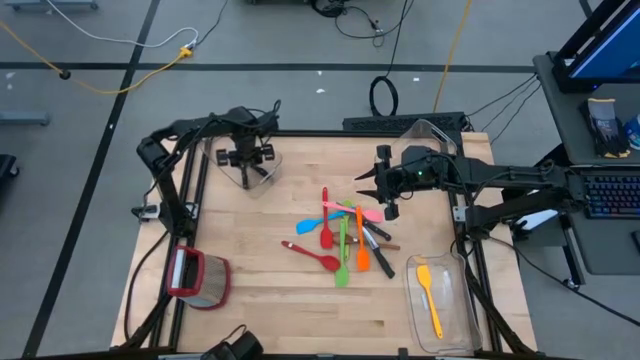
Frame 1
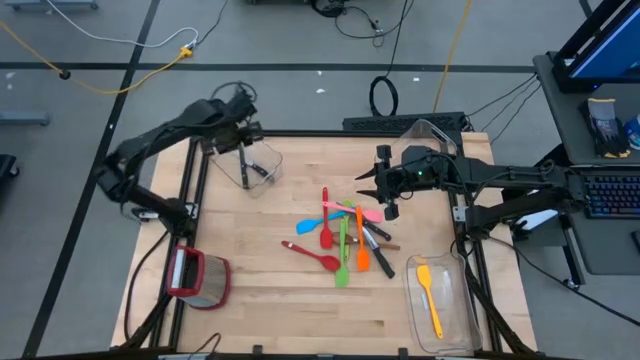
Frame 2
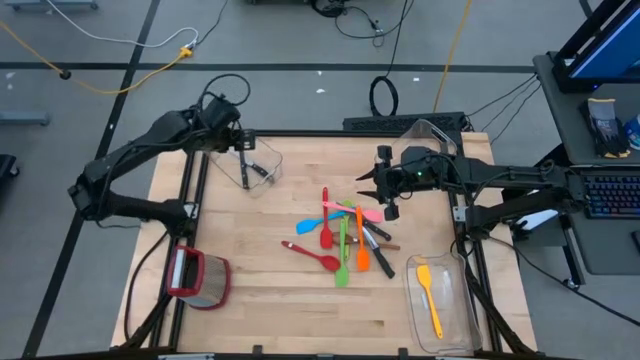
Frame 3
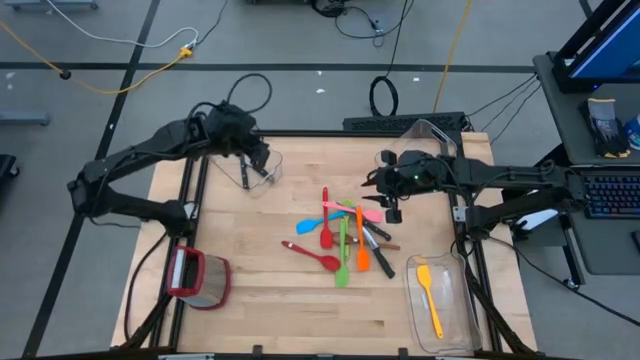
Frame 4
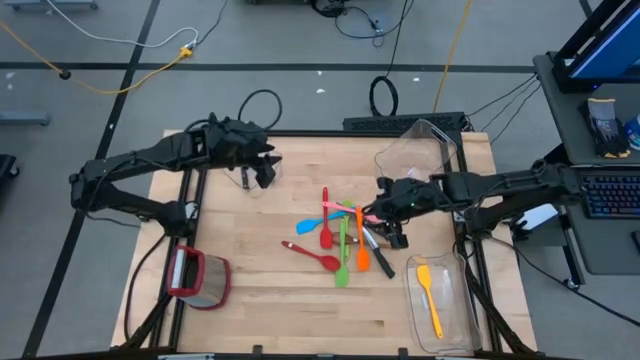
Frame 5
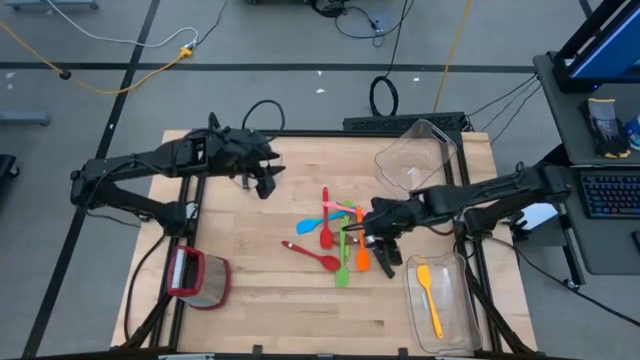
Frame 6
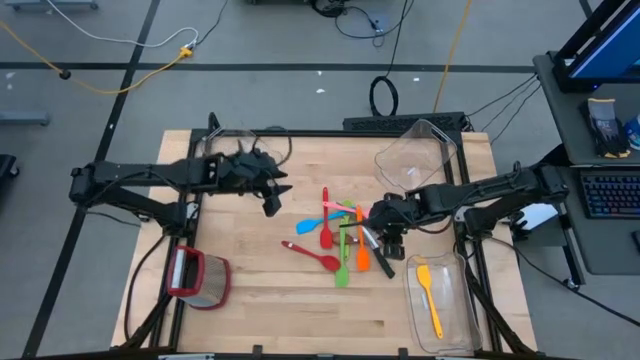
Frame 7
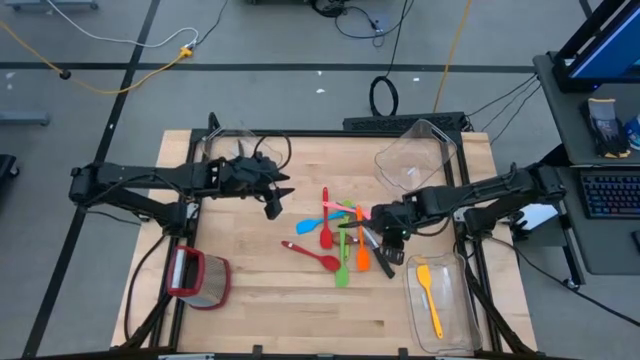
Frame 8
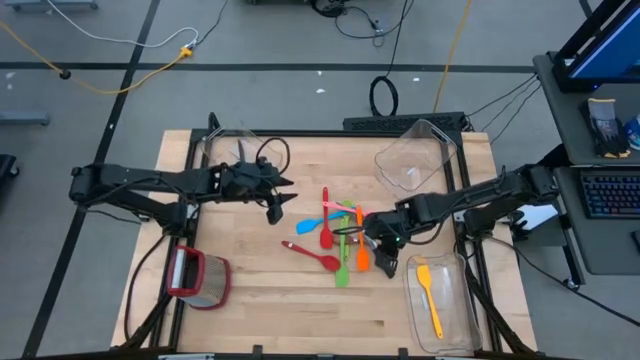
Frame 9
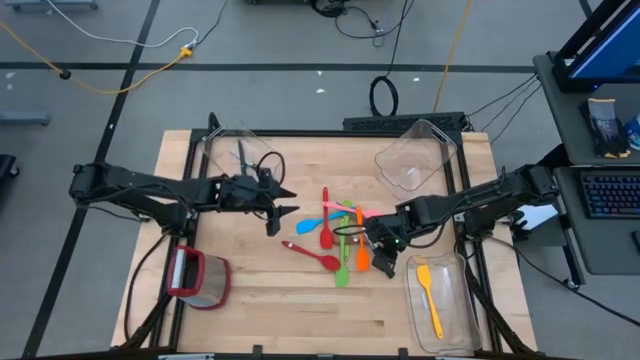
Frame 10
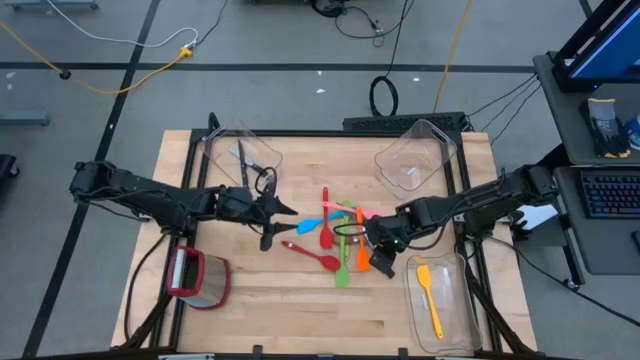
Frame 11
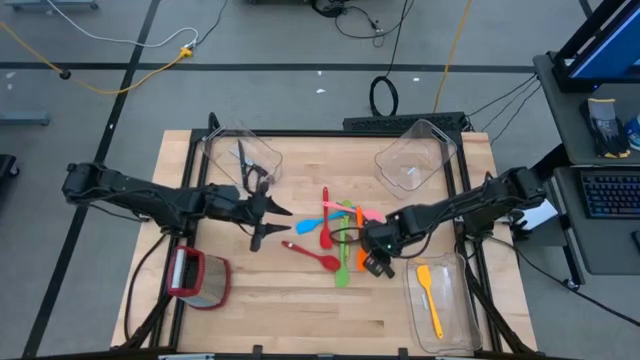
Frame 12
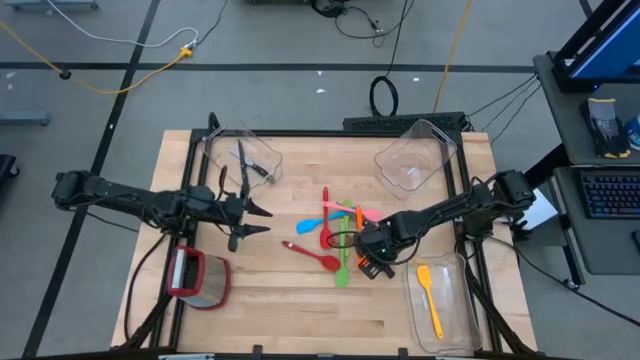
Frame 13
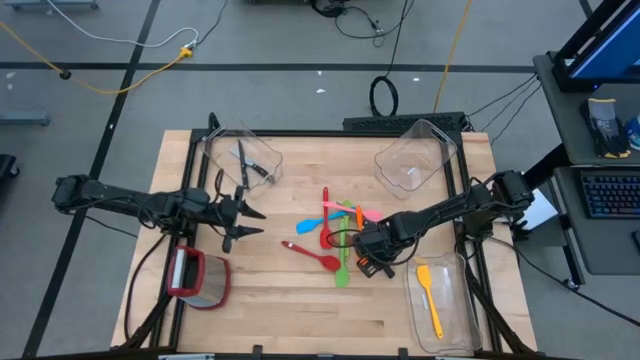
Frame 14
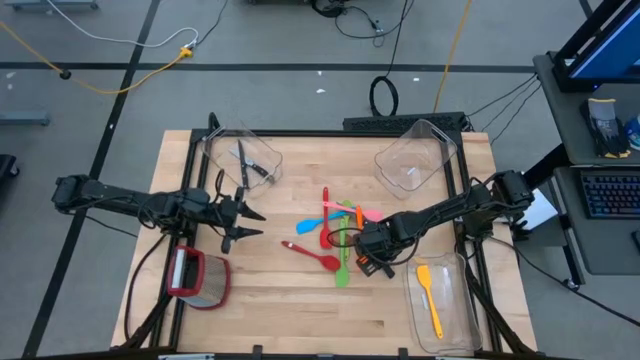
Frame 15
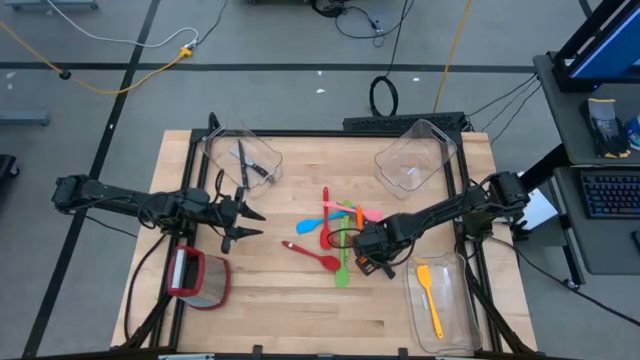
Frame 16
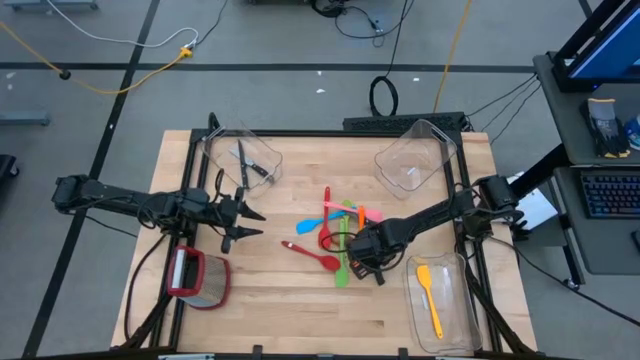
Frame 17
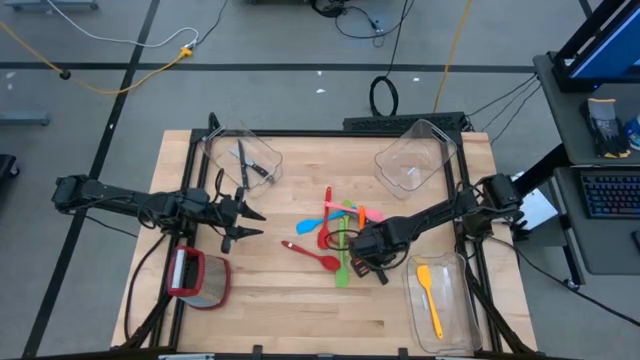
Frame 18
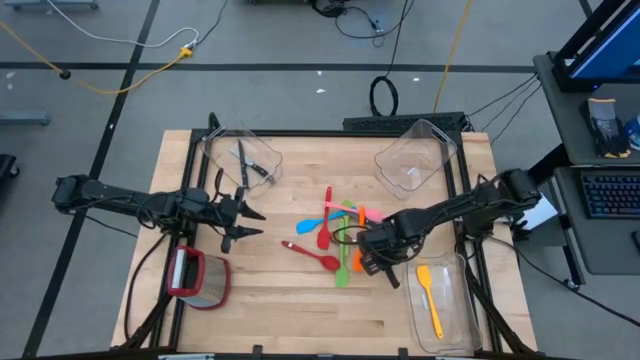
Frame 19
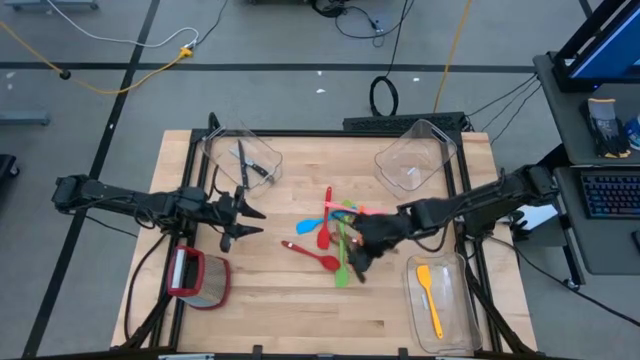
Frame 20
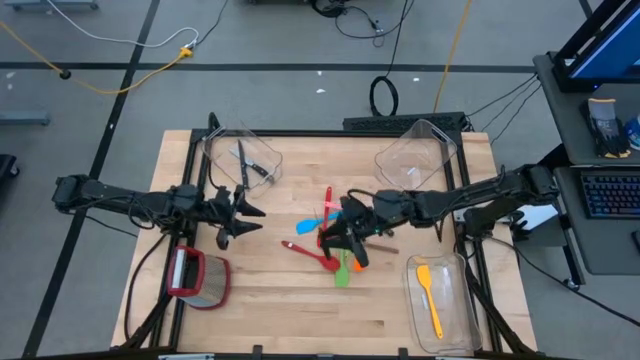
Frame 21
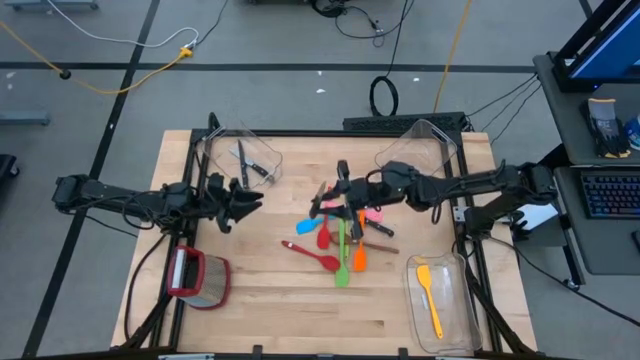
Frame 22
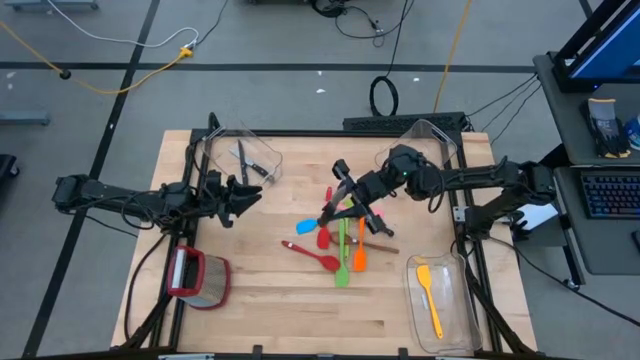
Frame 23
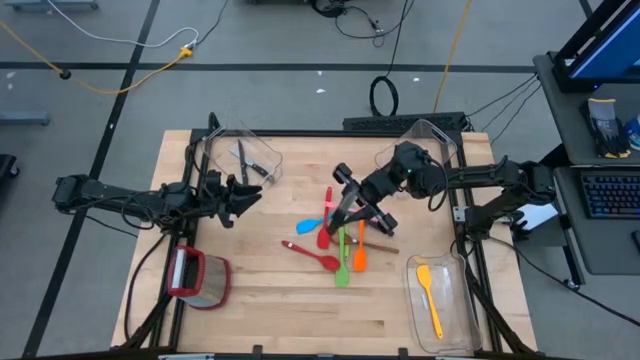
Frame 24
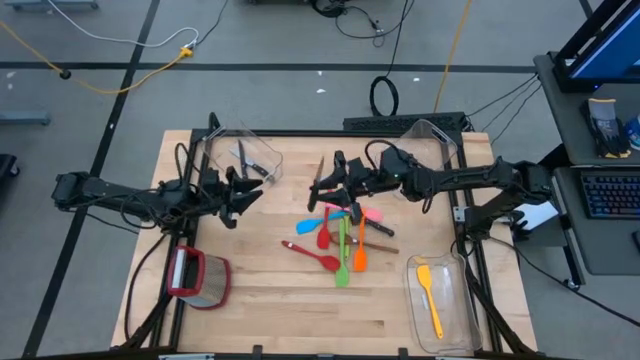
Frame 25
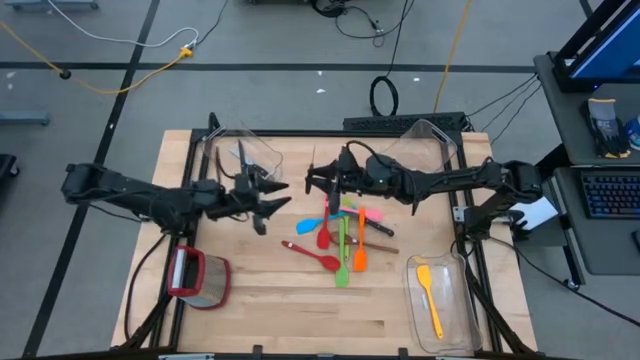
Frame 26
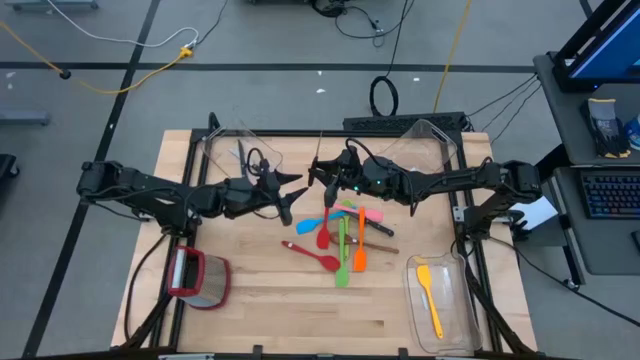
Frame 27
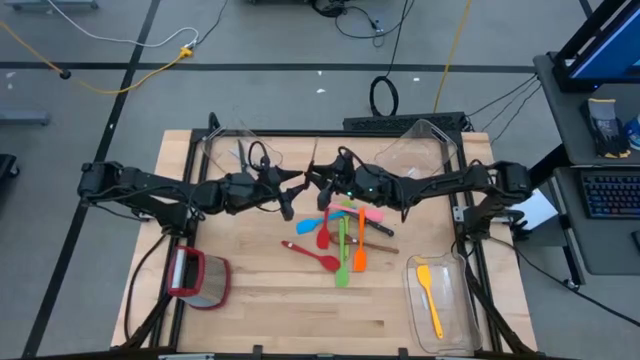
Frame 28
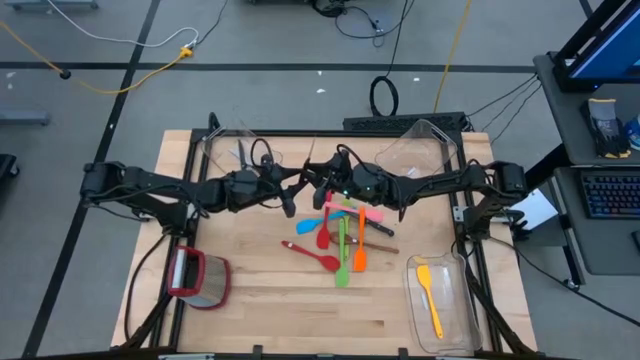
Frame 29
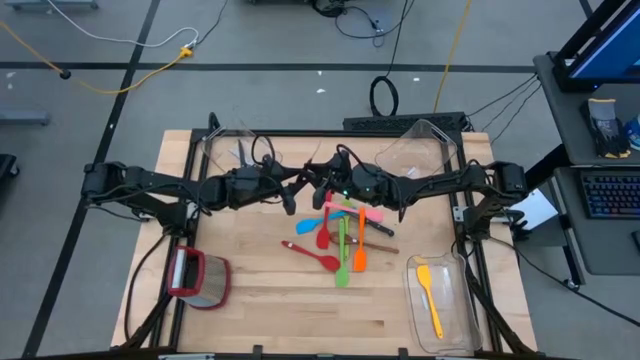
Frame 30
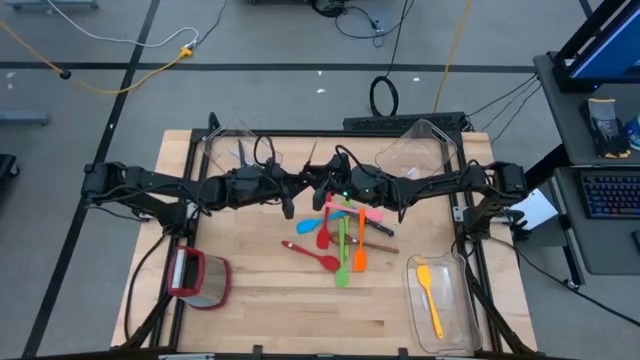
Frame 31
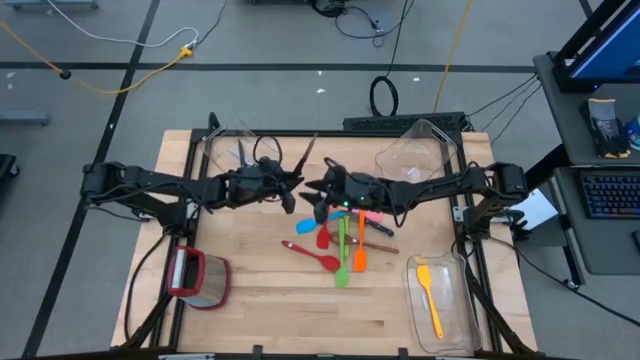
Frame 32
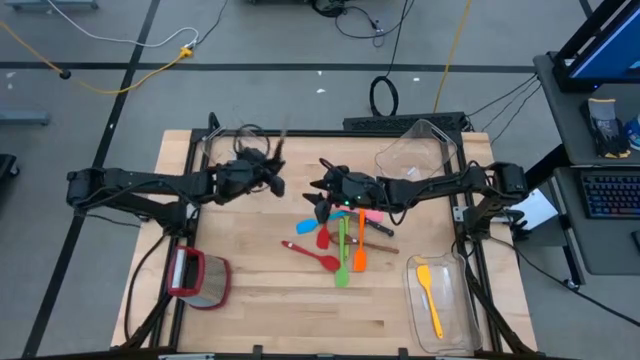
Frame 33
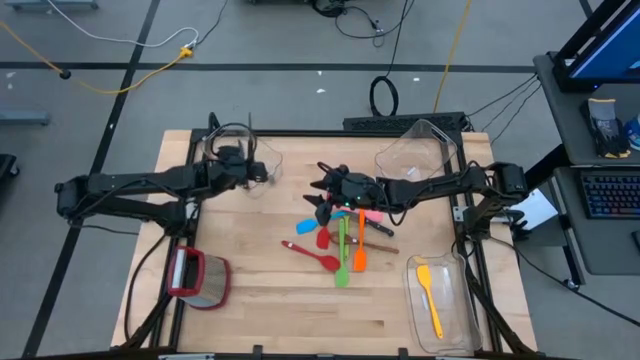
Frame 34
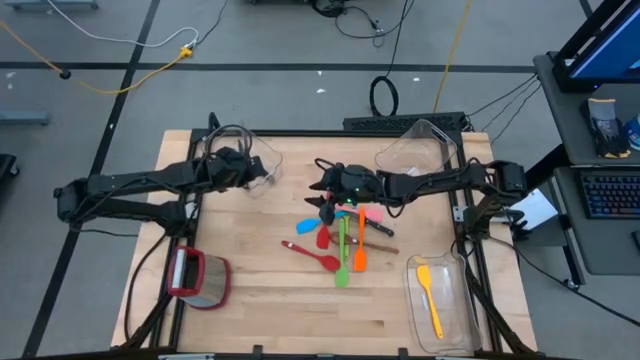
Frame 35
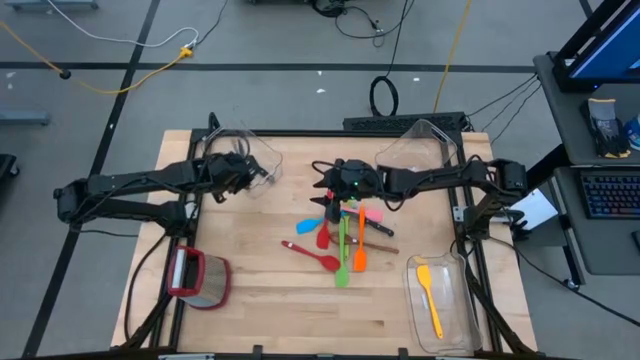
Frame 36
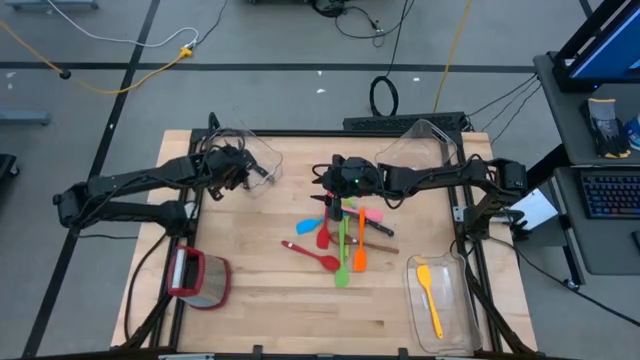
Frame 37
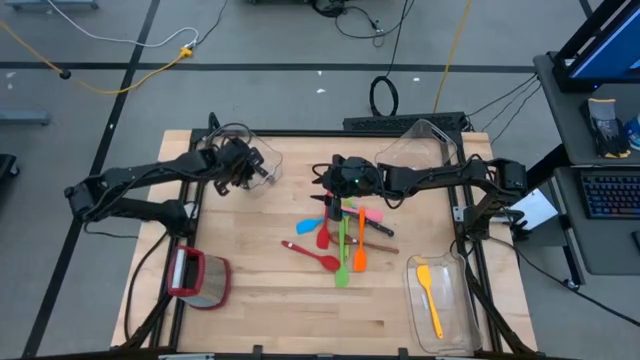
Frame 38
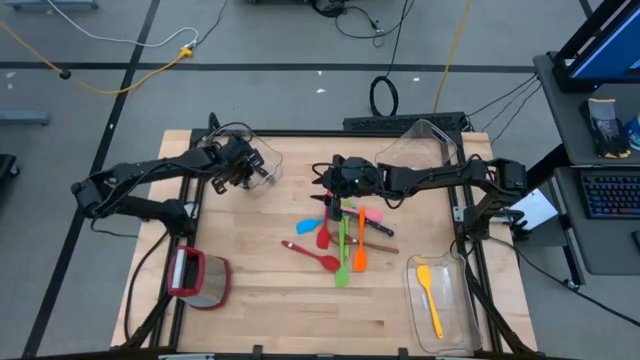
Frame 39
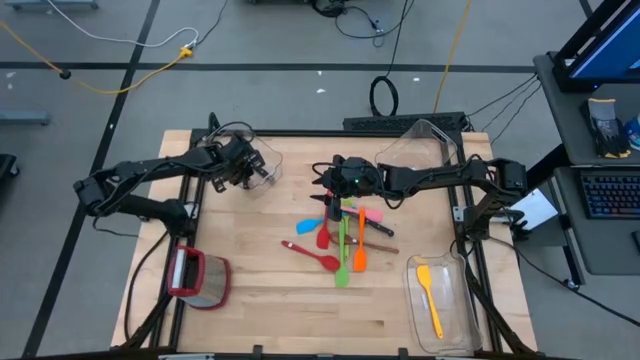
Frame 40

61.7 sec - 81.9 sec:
Task: Pick & Place Kitchen Items
Put the black kitchen knife into the top left transparent bin

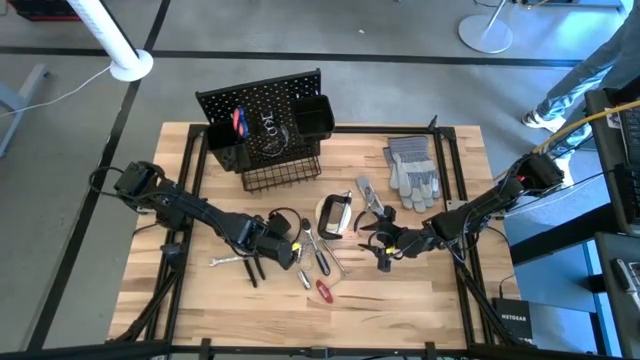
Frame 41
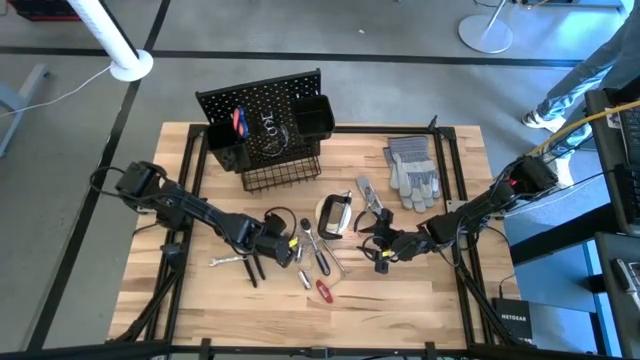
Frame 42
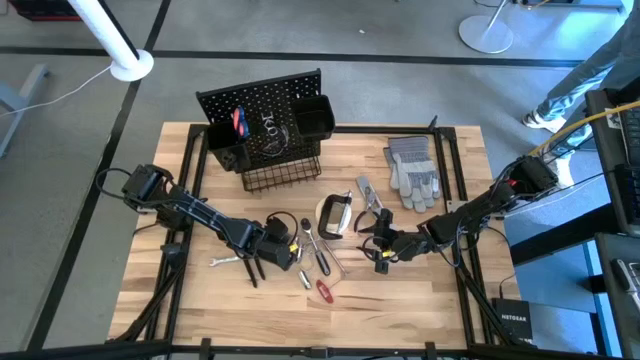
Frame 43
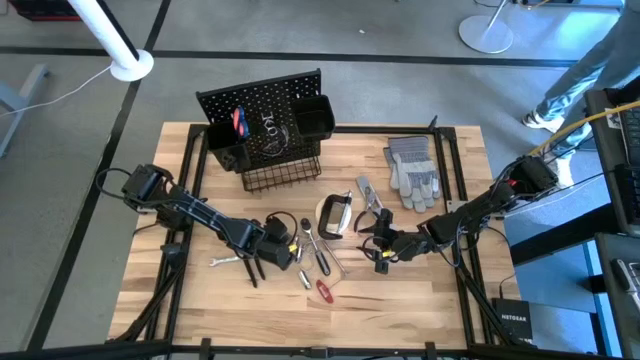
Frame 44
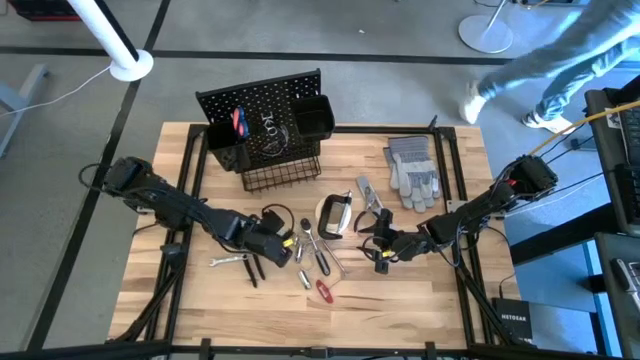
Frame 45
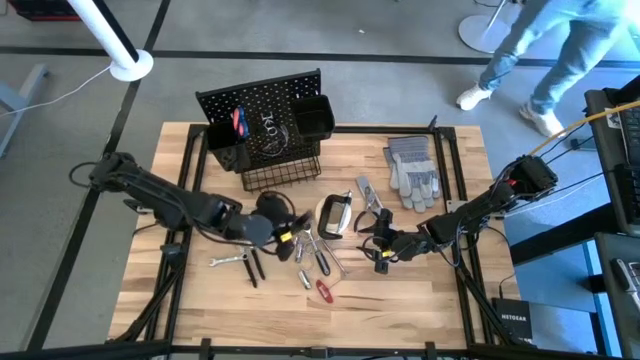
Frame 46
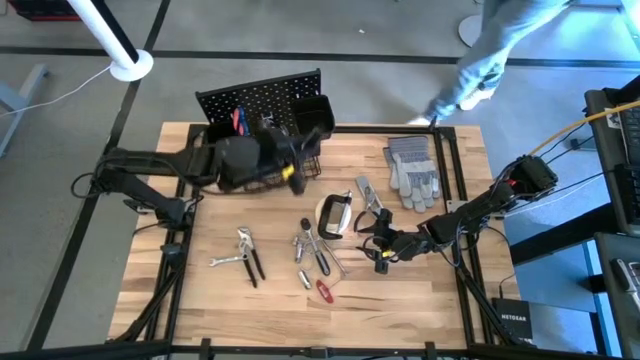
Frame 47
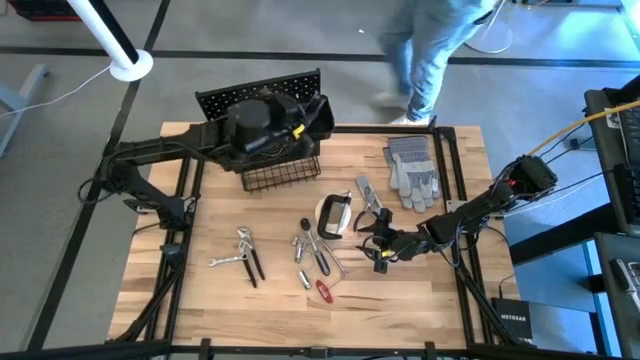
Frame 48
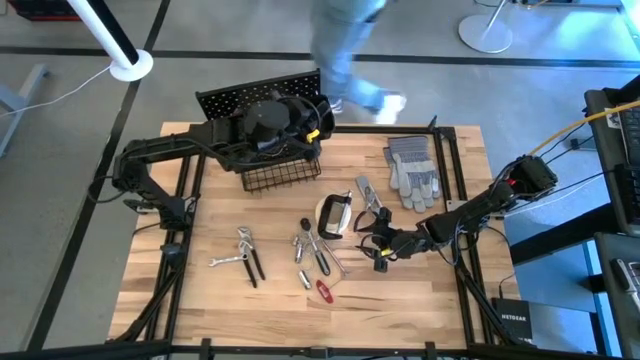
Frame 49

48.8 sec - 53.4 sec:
Task: Hang tools onto peg board
Put the blade dispenser into the right black bin on the pegboard
